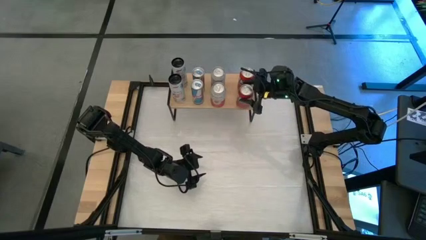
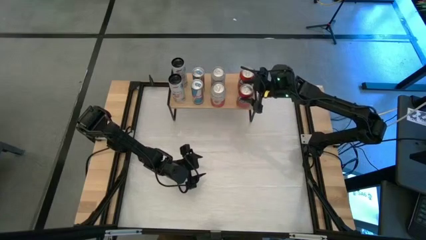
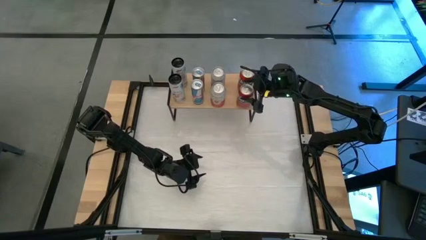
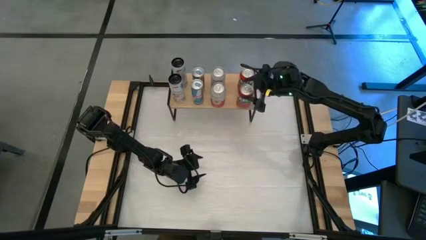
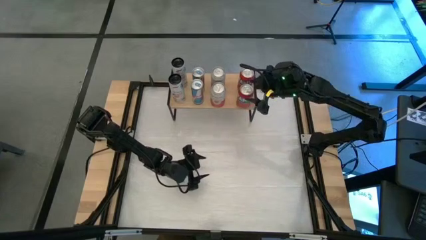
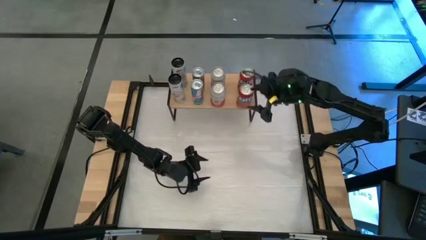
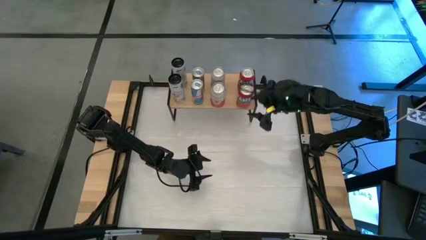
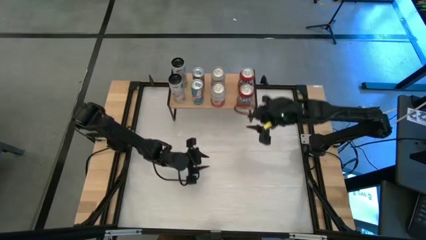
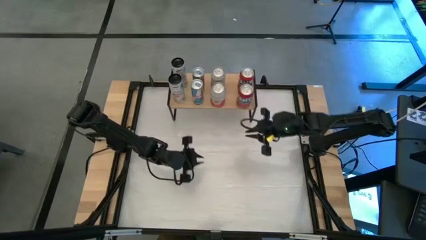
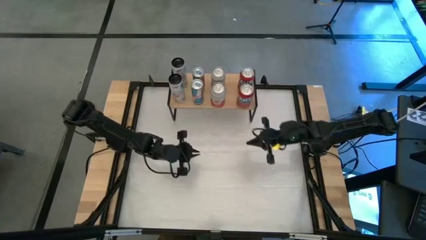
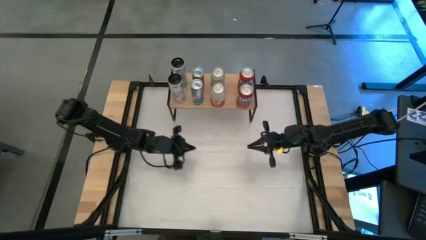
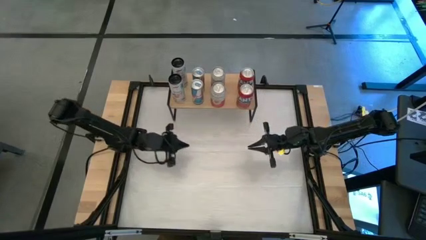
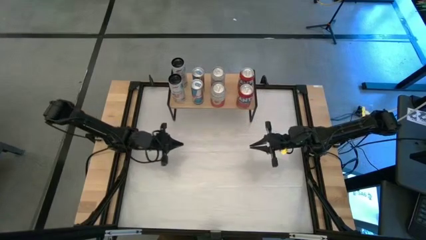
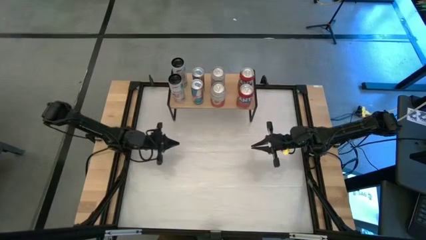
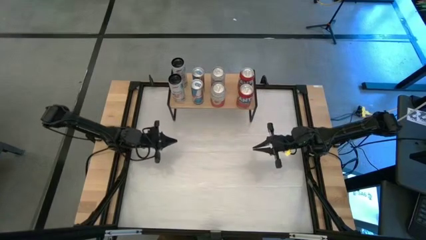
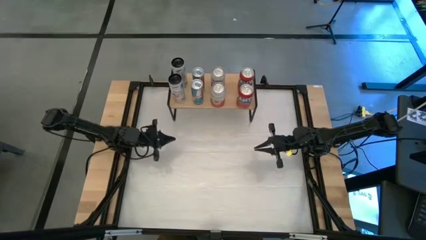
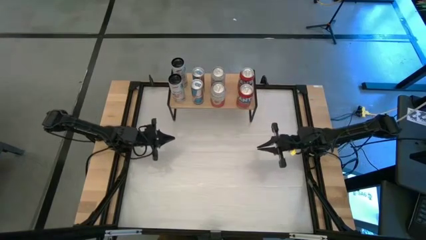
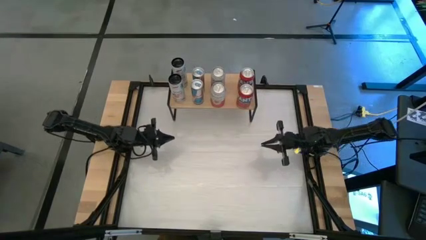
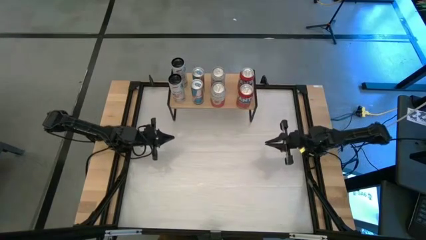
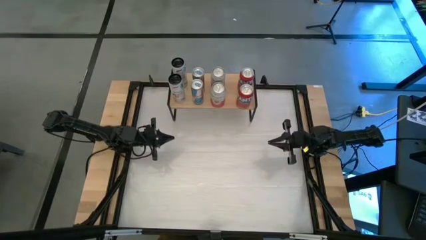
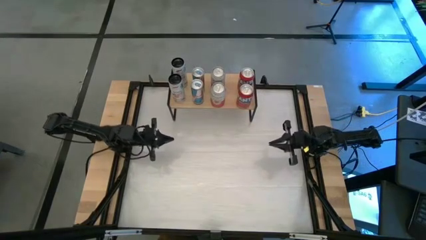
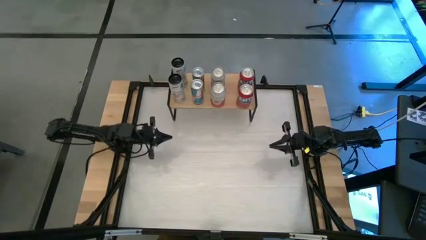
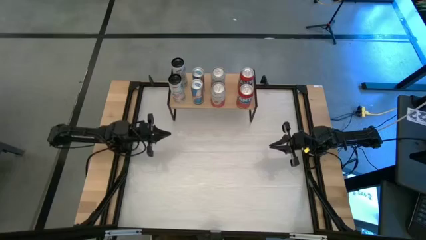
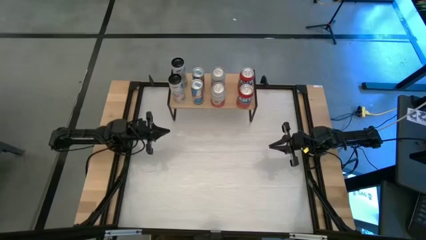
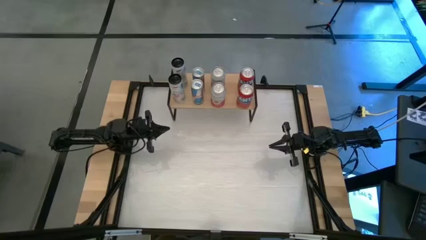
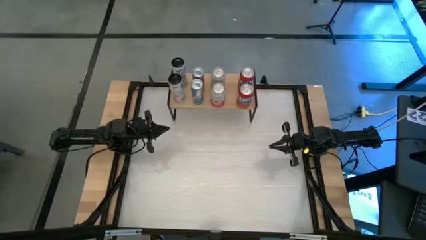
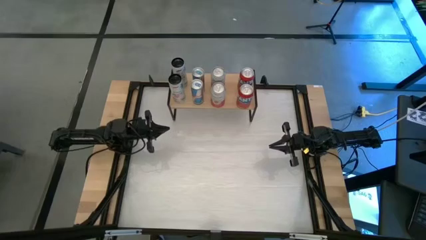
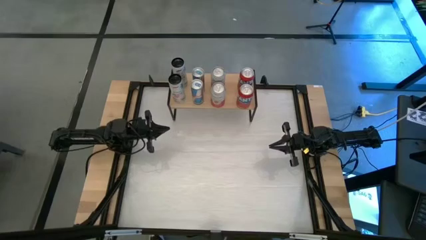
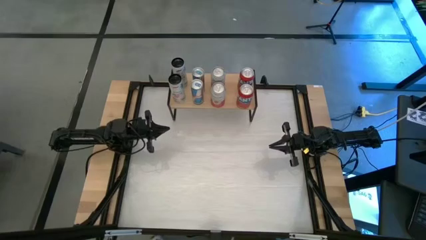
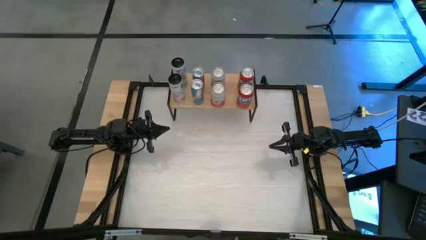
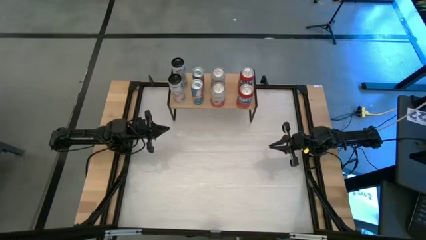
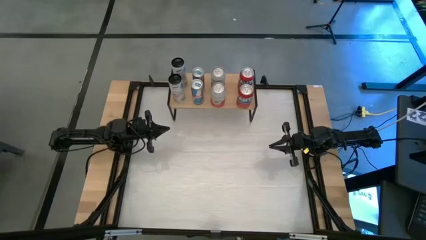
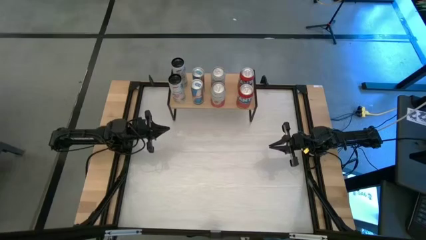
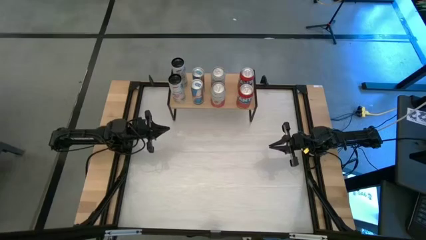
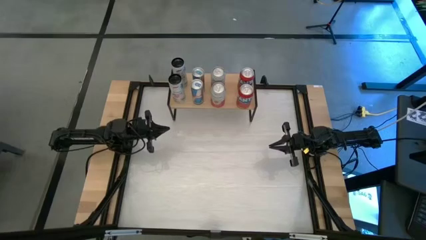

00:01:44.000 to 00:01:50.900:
Task: Place canned beverage on shelf
Return to Home Position

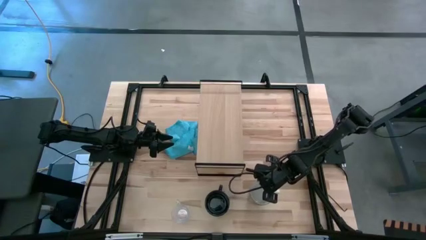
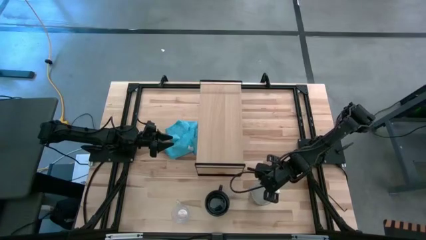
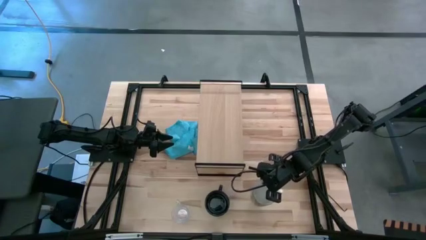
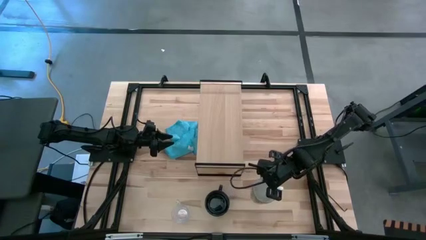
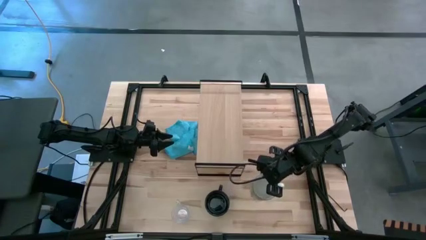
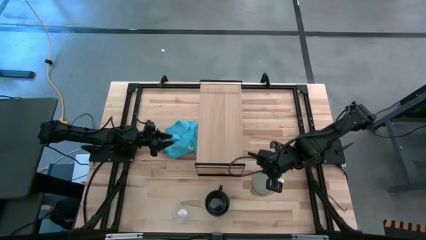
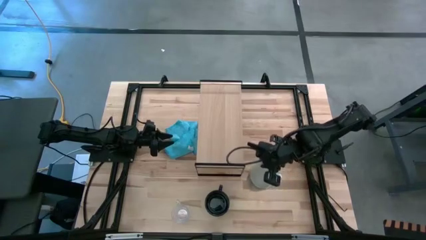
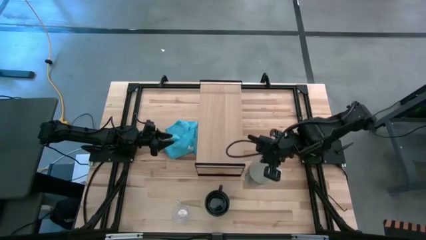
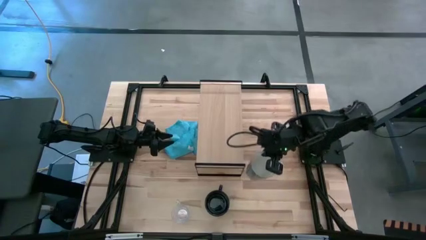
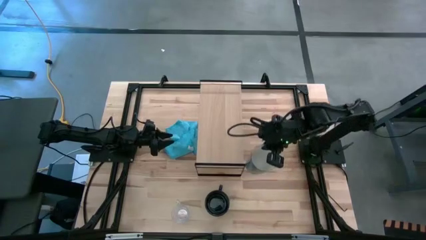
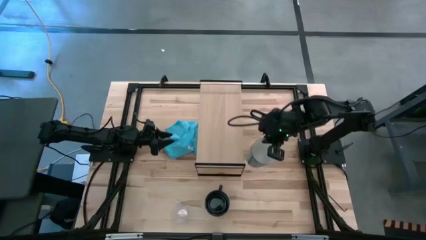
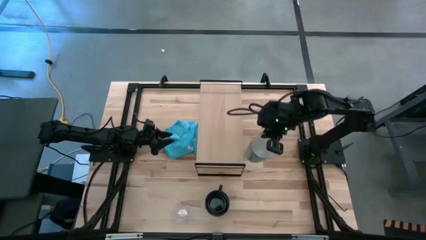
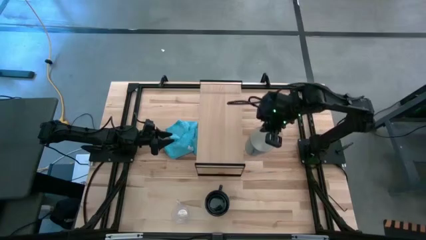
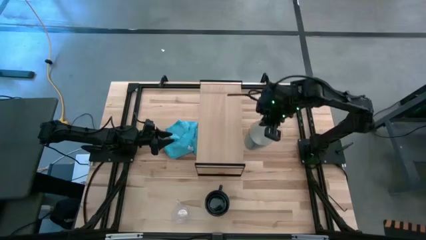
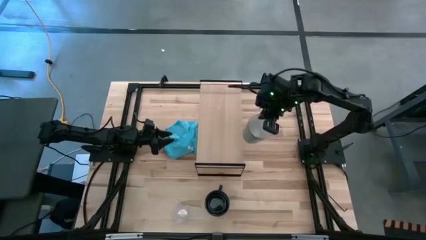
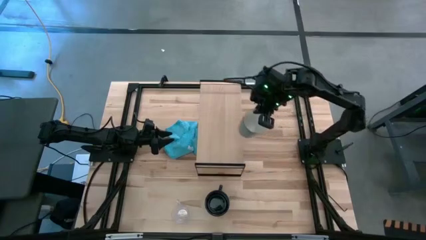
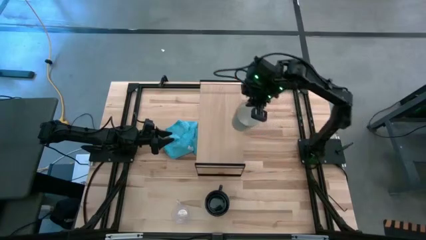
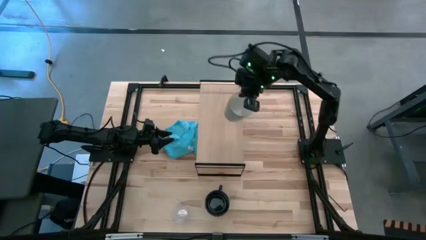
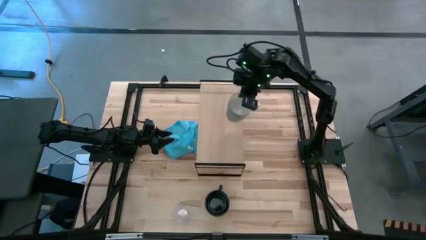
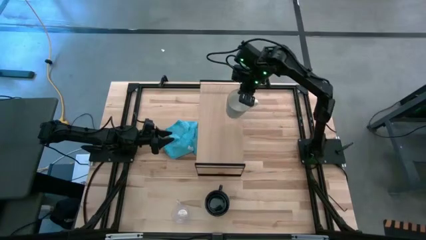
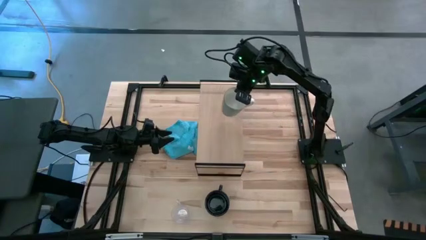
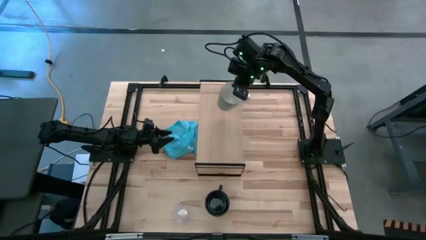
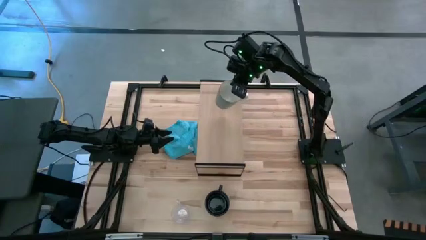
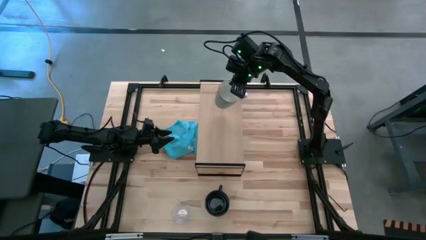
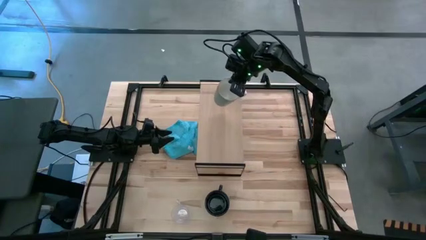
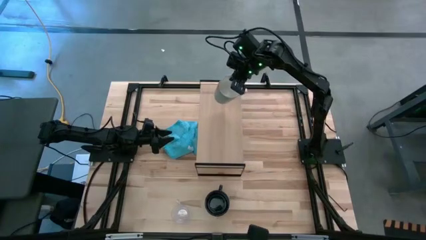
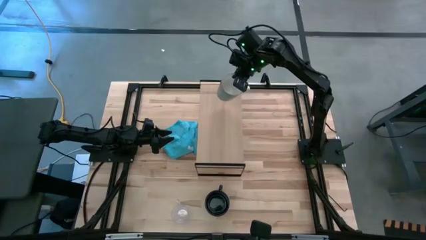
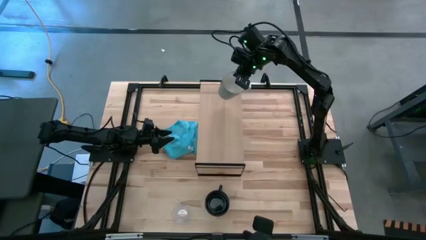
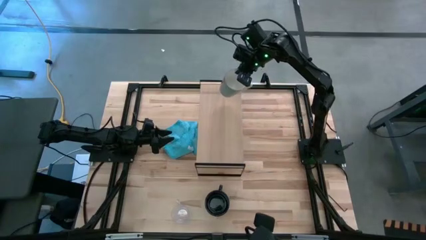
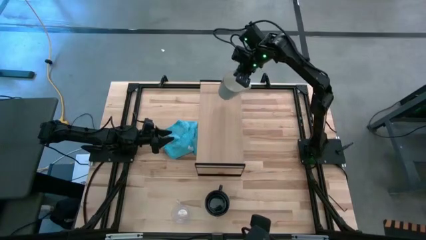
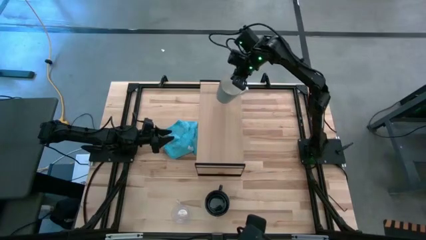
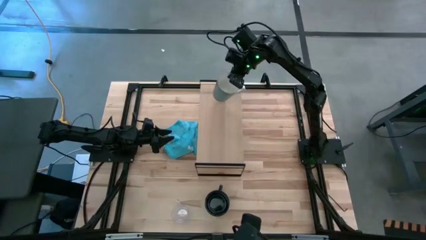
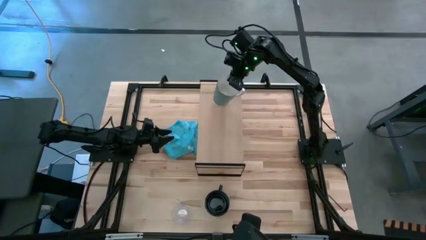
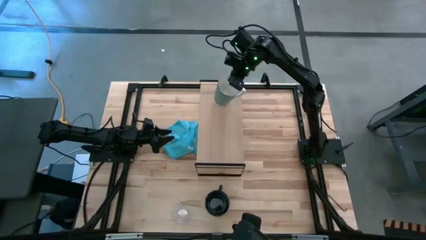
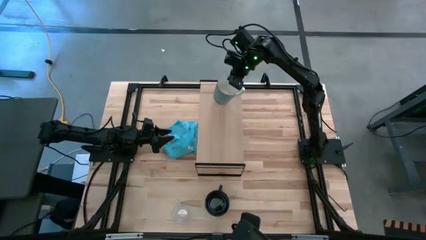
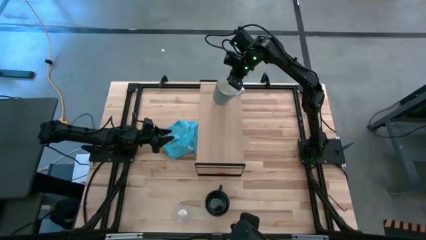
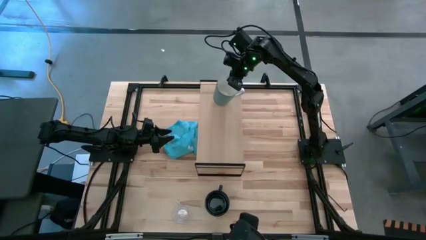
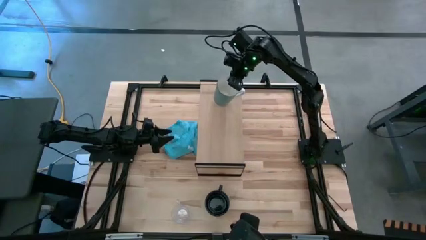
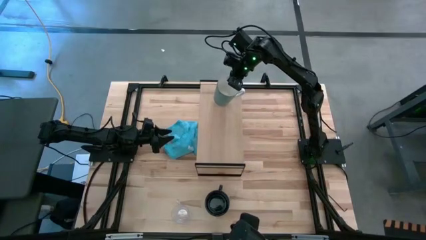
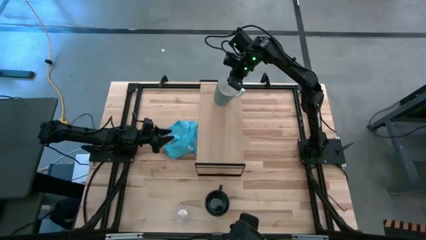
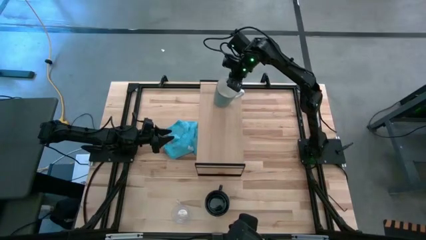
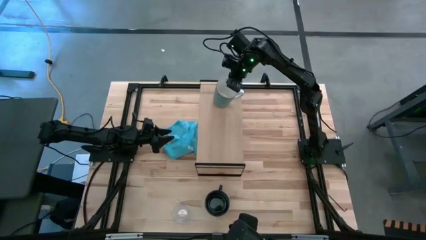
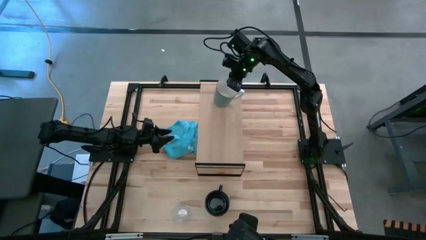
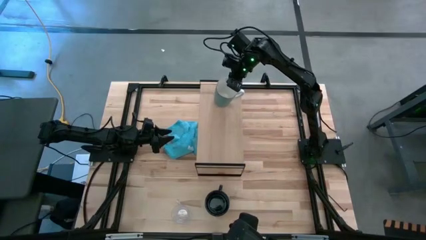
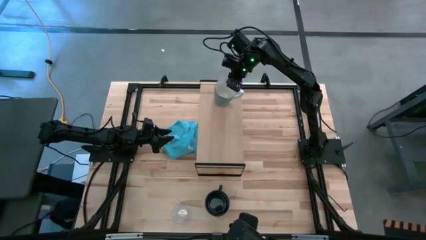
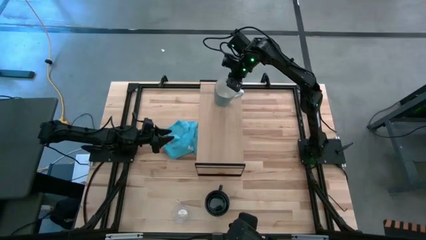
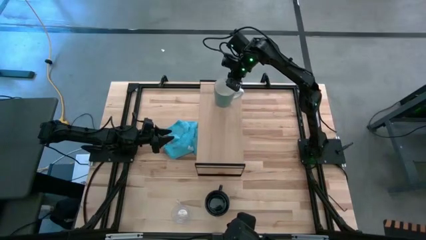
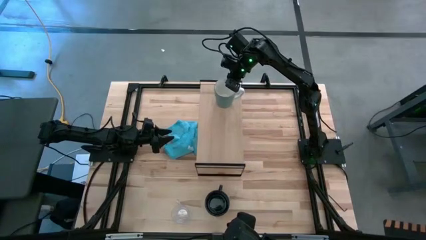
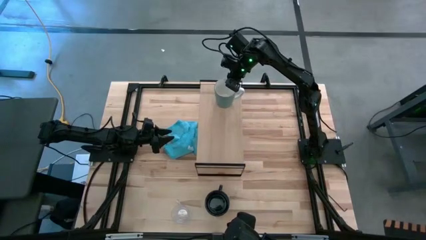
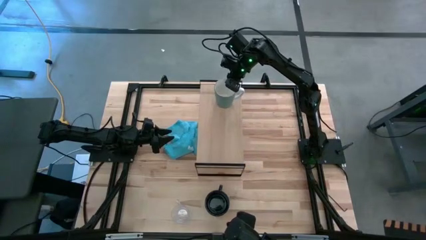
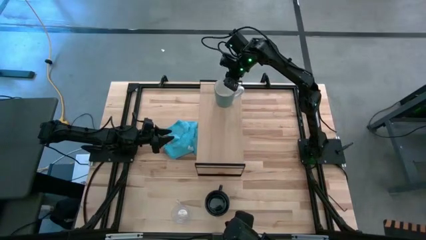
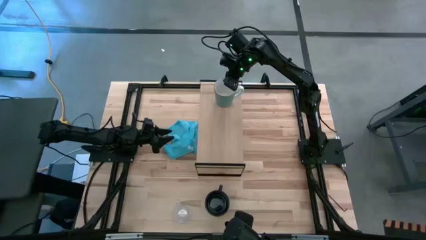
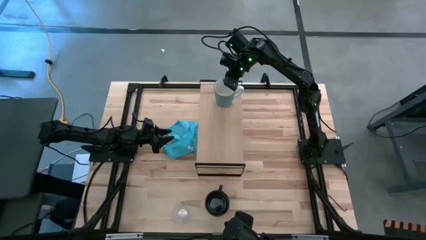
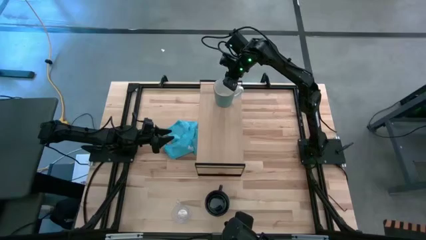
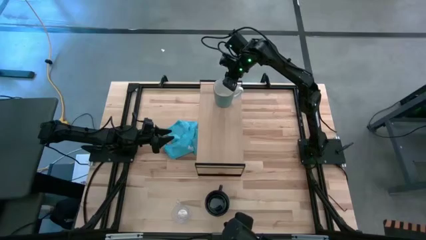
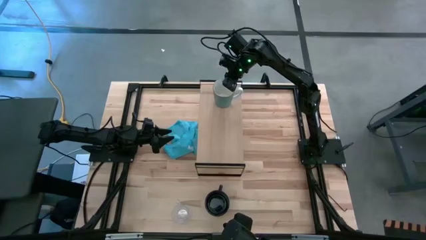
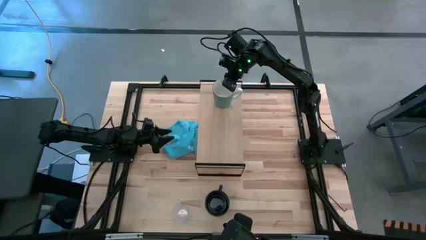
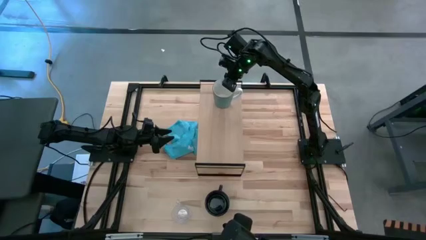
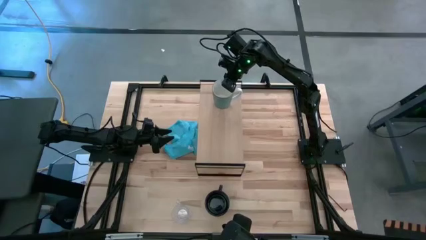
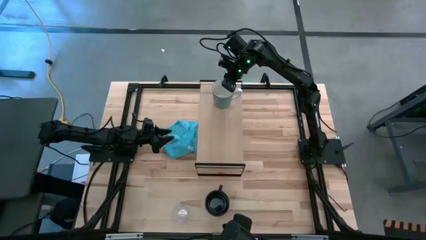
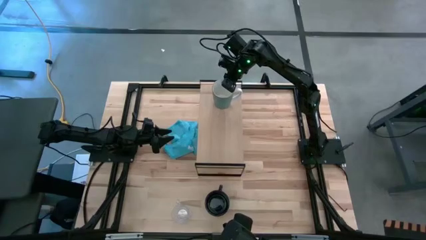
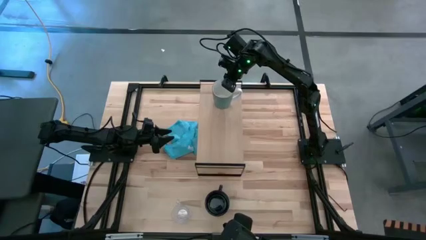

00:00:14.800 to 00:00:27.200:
Task: Stack small to large cups/mugs on shelf
Put the blue mug on the shelf
